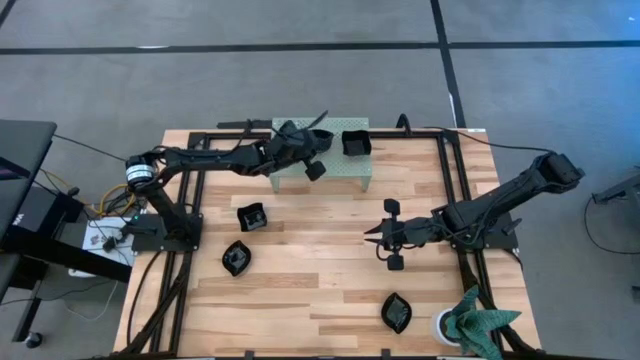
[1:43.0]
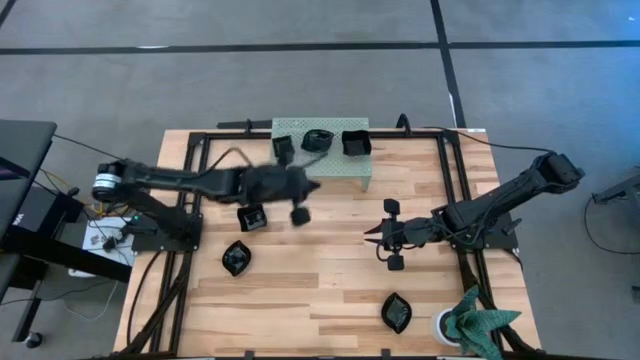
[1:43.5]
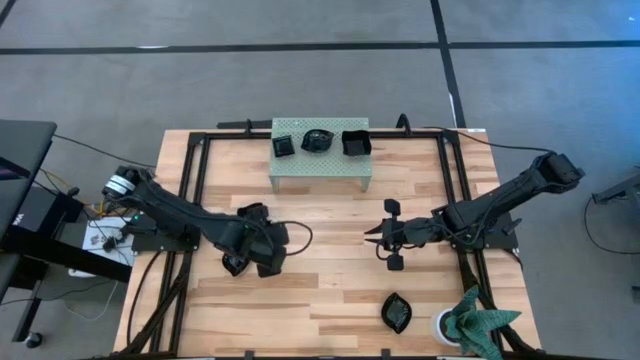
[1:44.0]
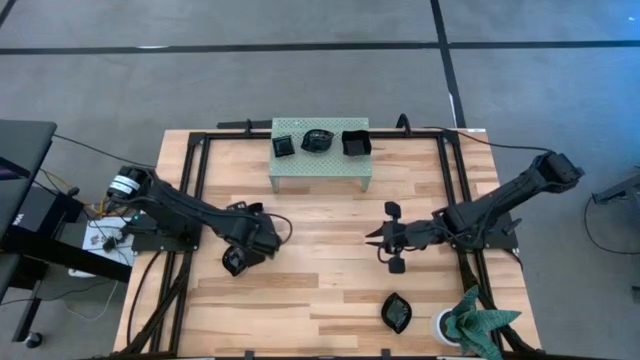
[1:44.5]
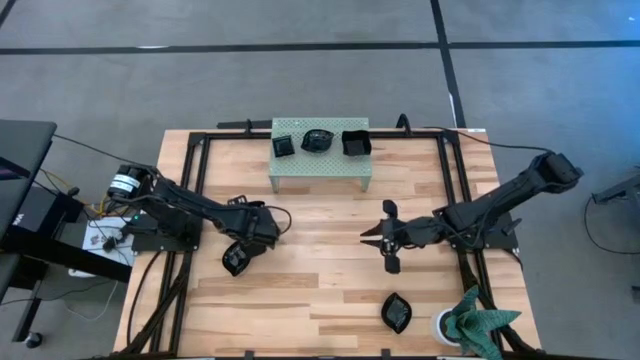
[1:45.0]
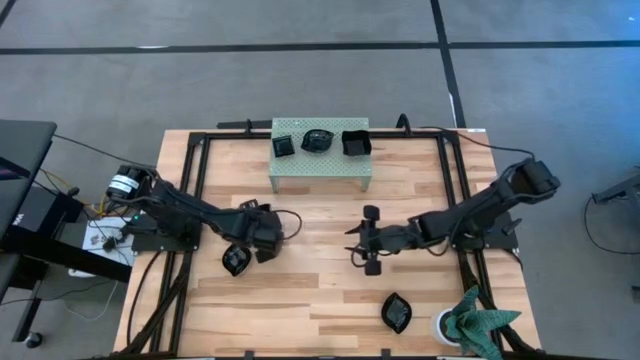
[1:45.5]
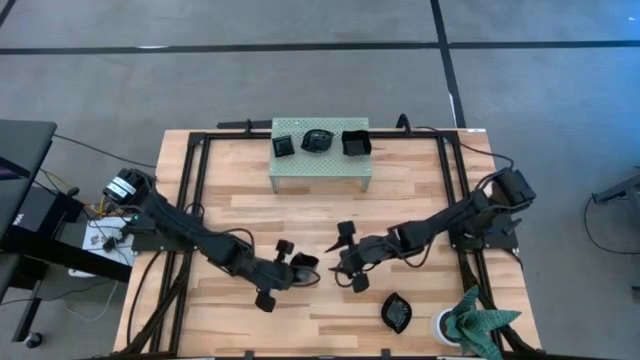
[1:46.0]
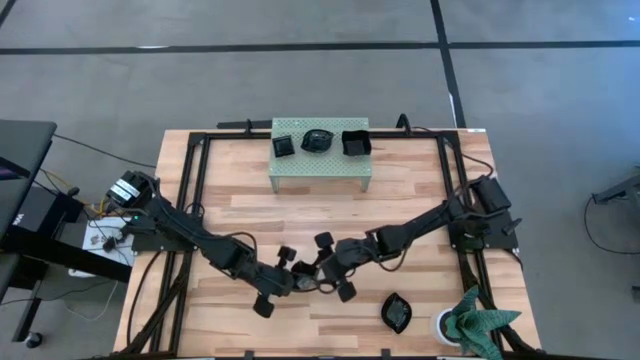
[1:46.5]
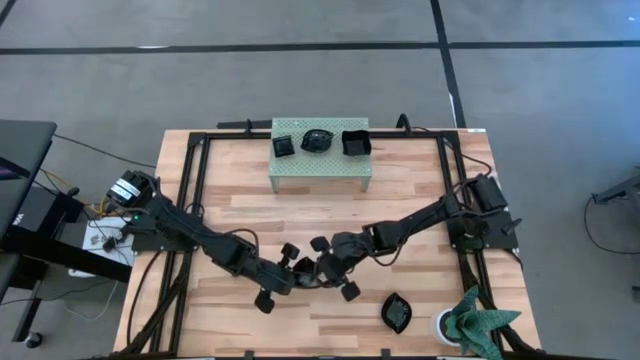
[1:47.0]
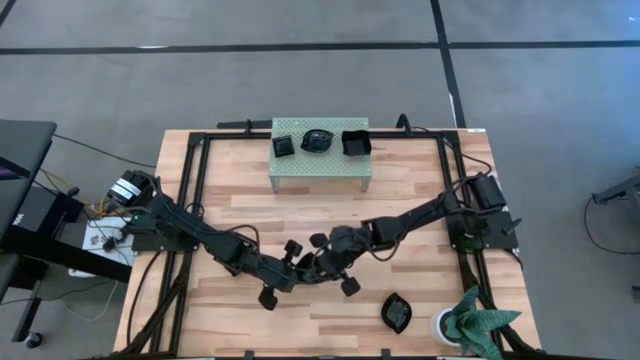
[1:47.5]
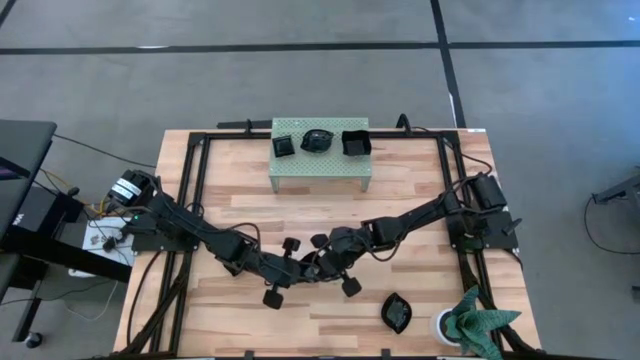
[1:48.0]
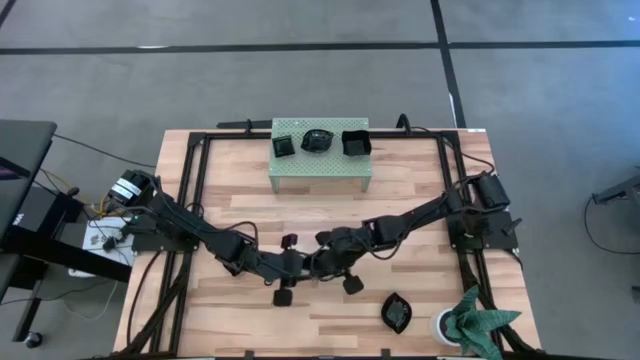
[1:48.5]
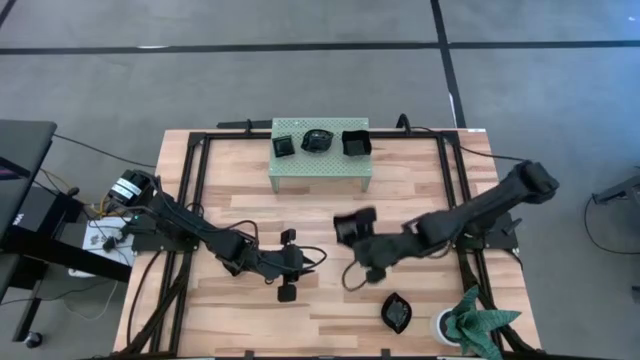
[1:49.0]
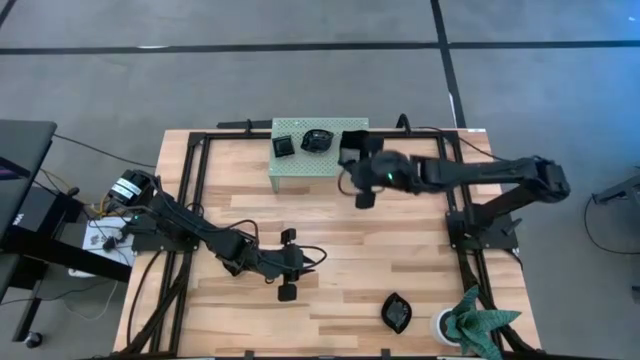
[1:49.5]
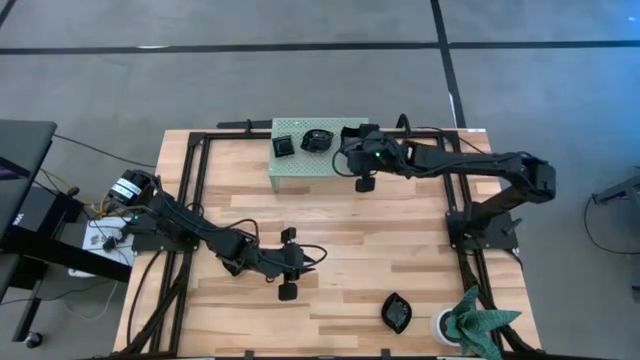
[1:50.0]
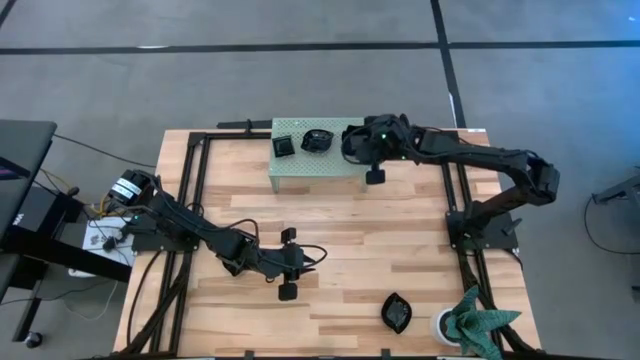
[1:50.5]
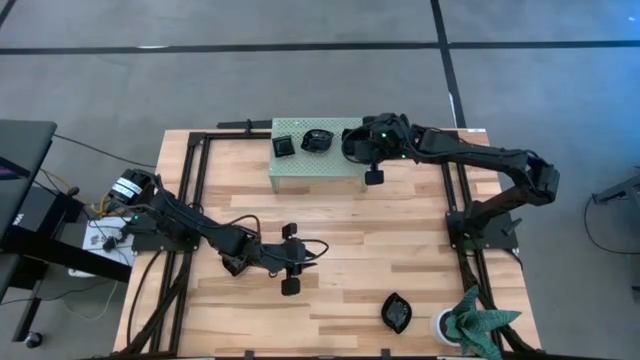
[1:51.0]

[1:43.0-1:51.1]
Task: Pick & Place Mini shaped plates
Stack the black distorted square plate on top of the black distorted square plate on the shelf

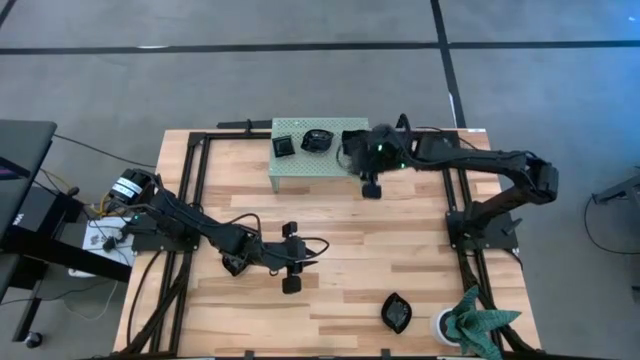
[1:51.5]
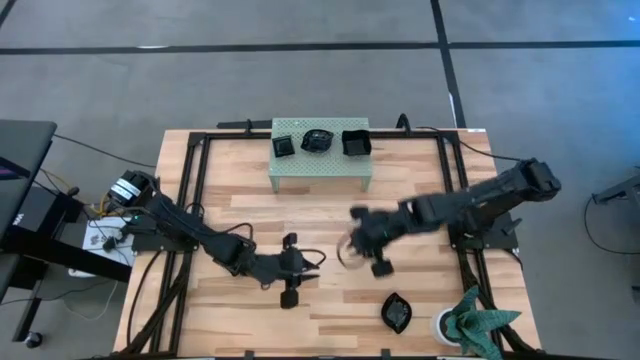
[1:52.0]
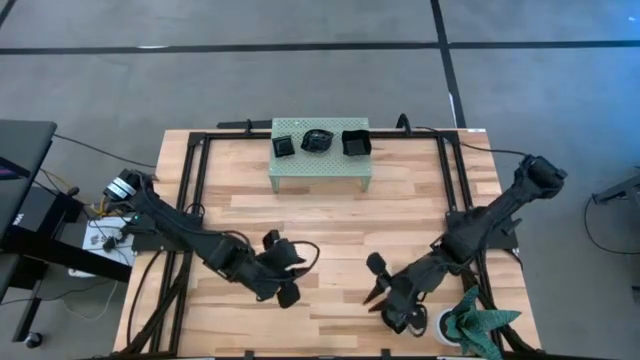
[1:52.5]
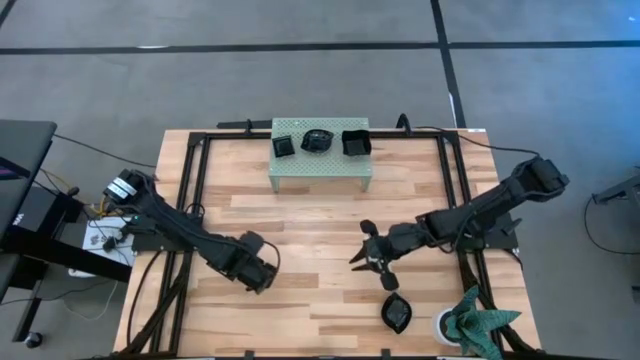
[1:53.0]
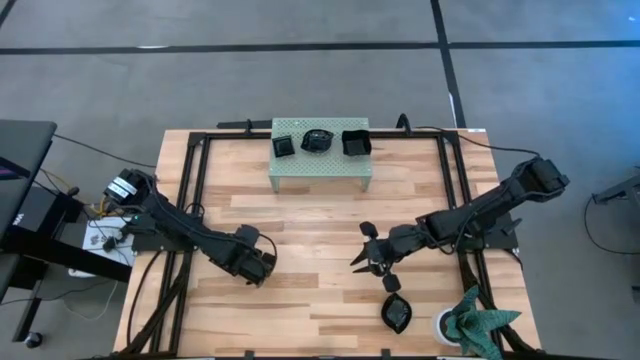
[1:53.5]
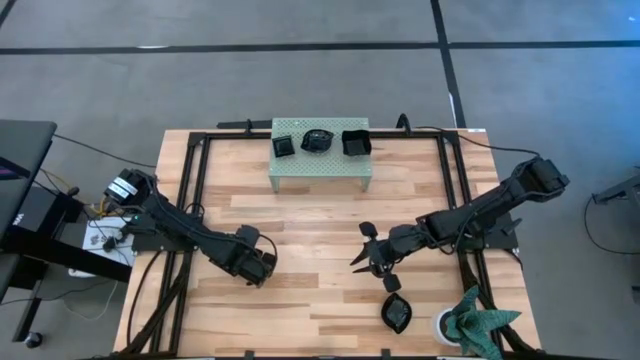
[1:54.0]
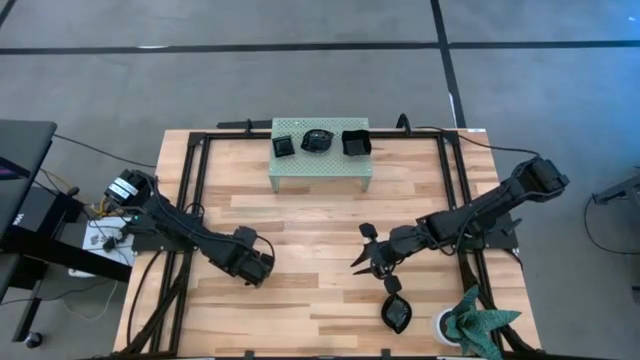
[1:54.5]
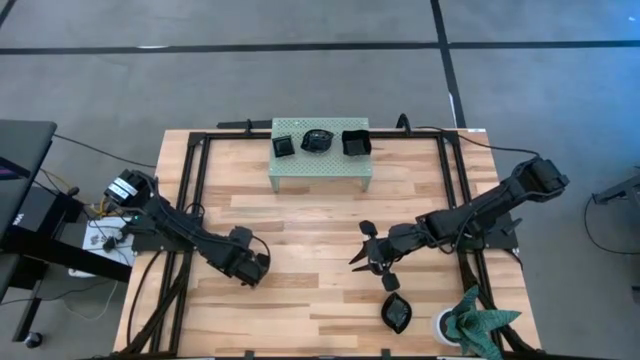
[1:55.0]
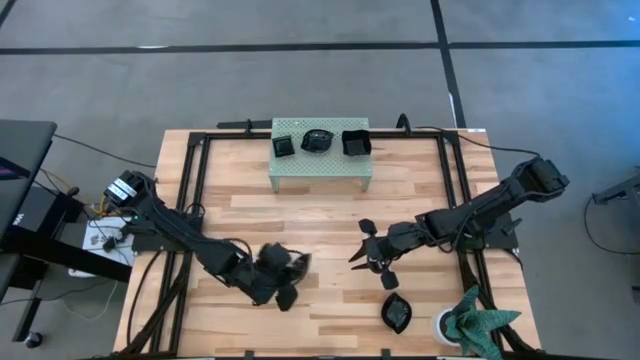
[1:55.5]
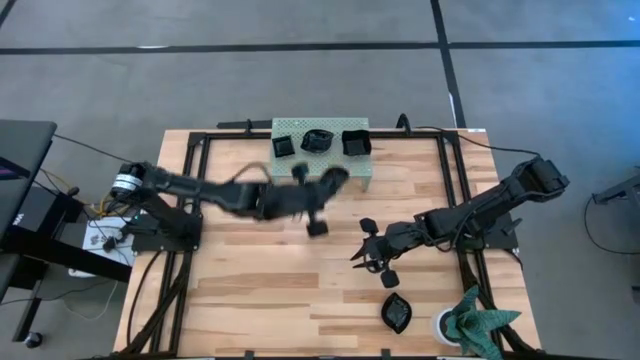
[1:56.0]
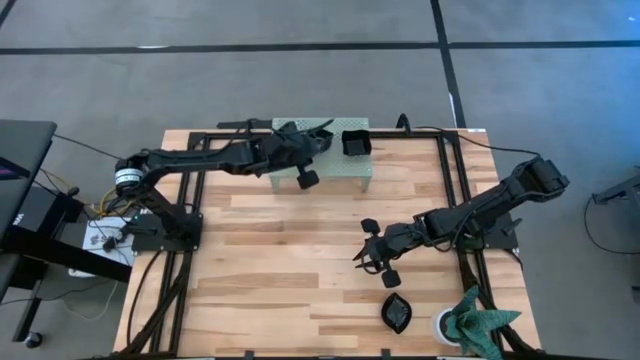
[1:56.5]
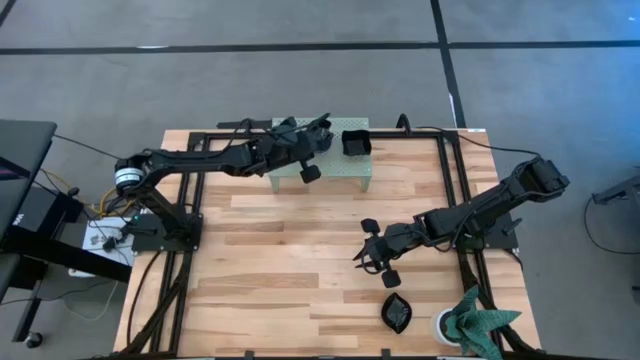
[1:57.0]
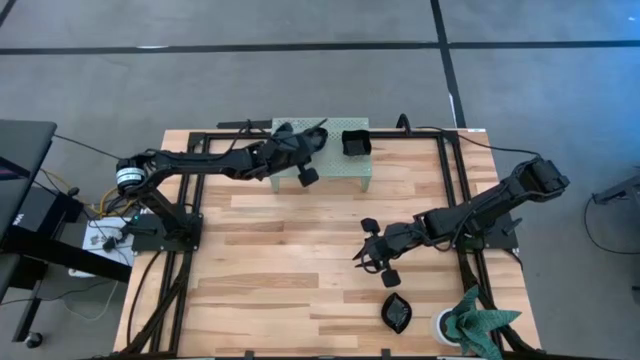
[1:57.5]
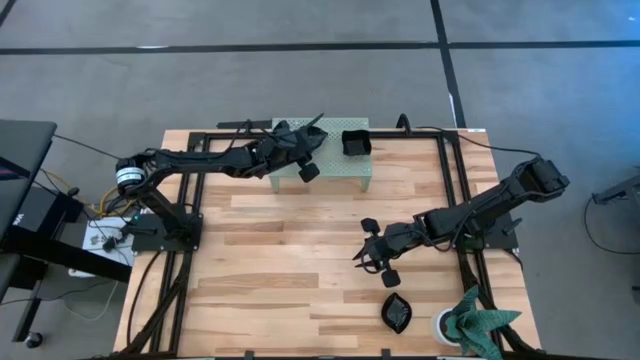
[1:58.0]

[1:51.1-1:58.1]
Stack the black leaf shape plate on top of the black leaf shape plate on the shelf

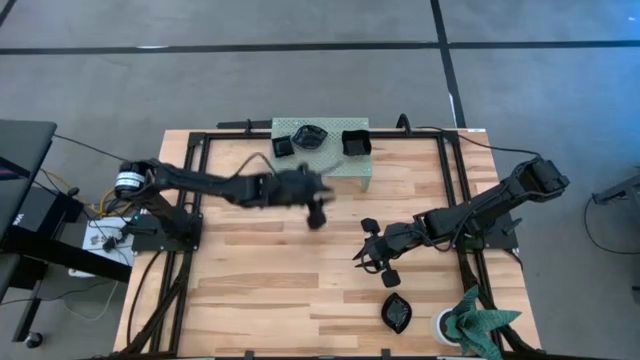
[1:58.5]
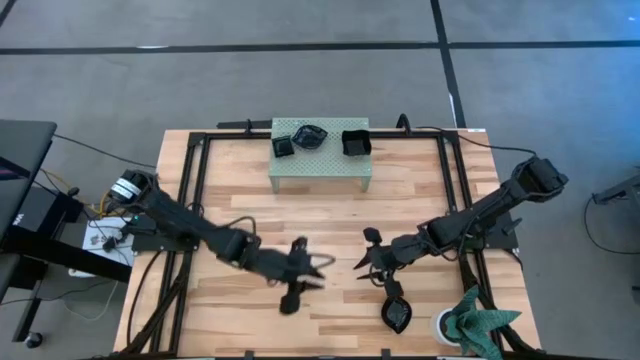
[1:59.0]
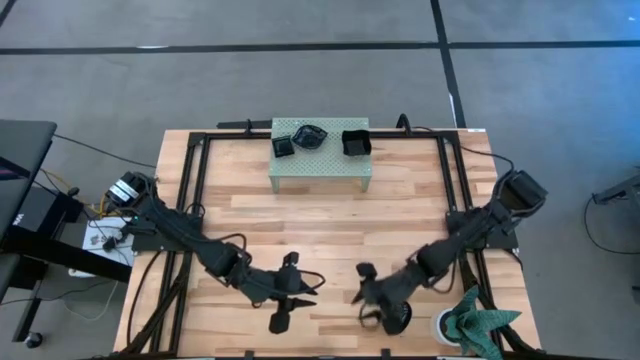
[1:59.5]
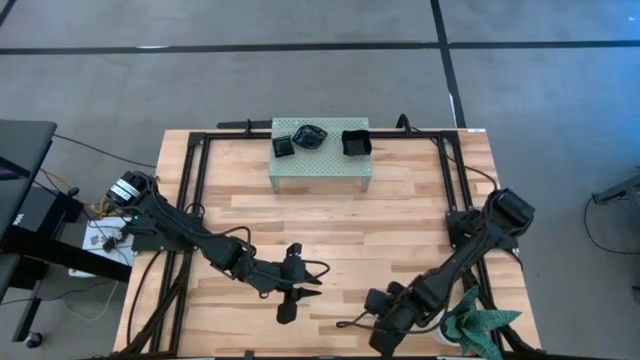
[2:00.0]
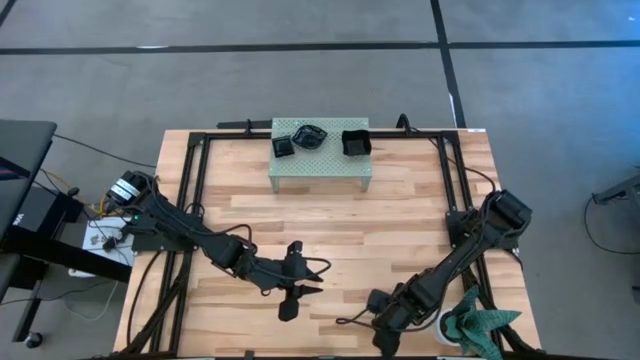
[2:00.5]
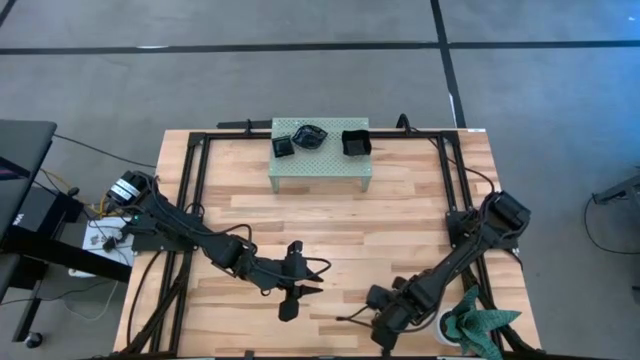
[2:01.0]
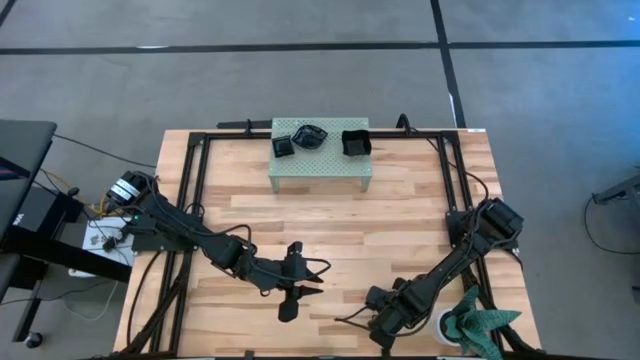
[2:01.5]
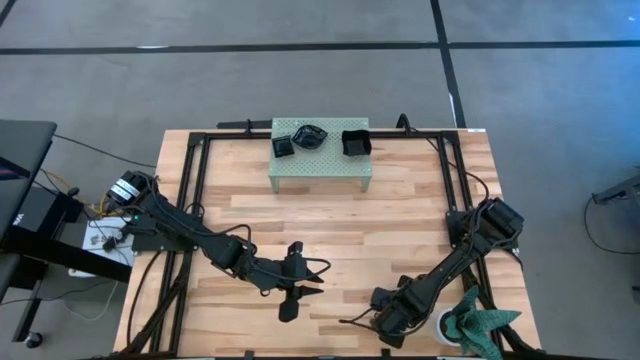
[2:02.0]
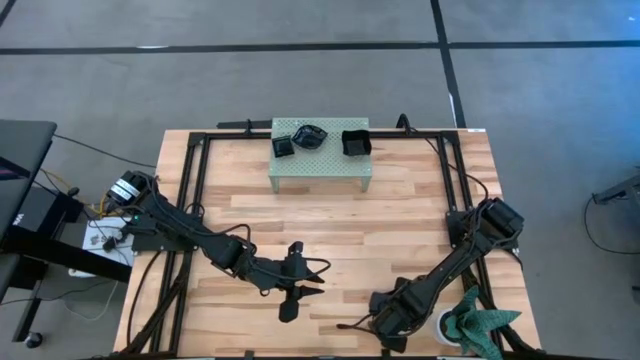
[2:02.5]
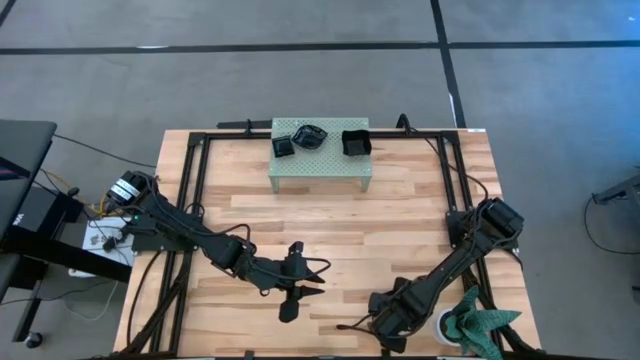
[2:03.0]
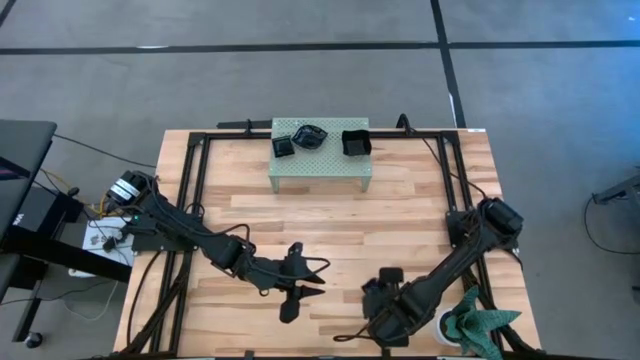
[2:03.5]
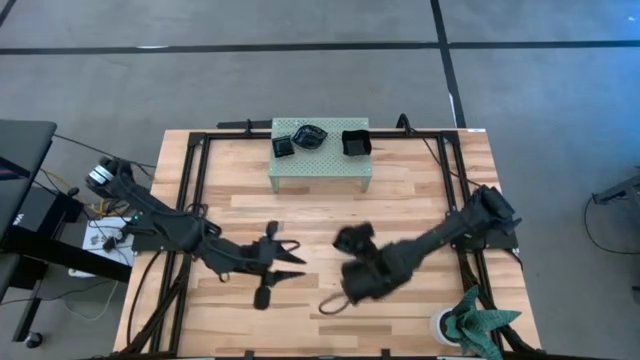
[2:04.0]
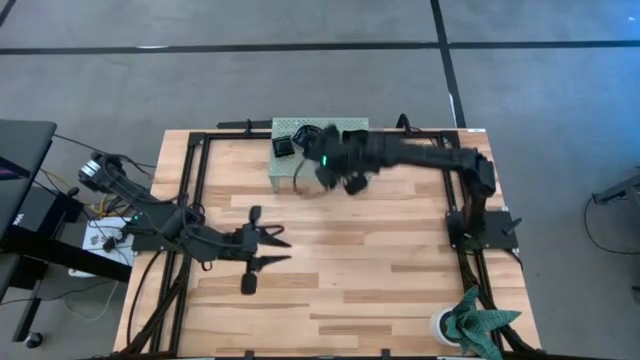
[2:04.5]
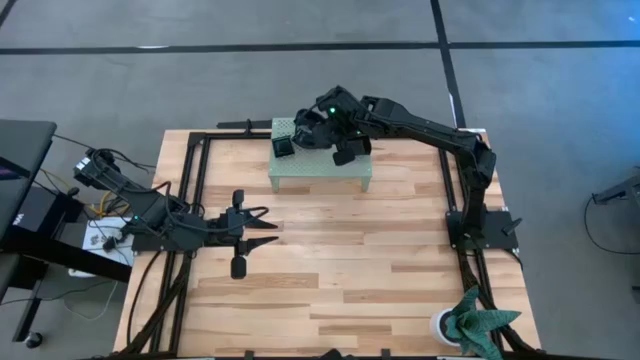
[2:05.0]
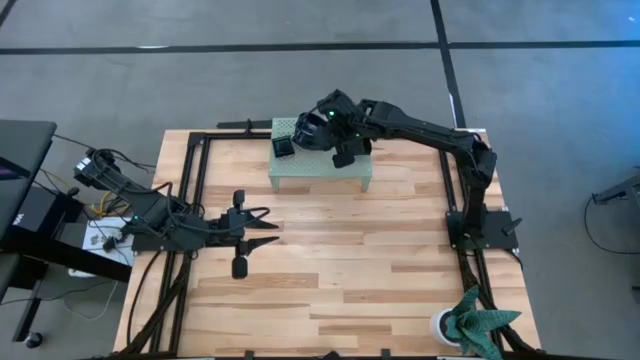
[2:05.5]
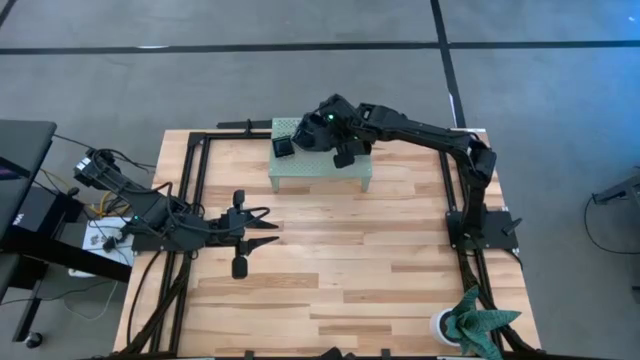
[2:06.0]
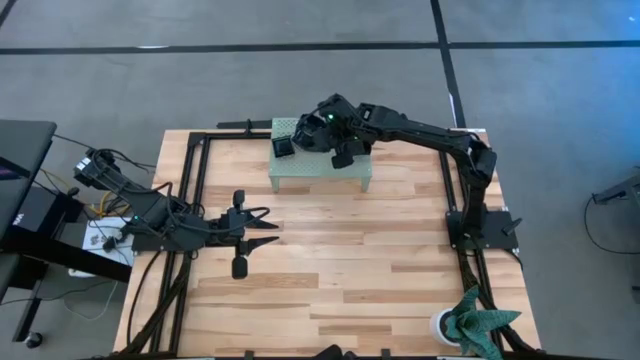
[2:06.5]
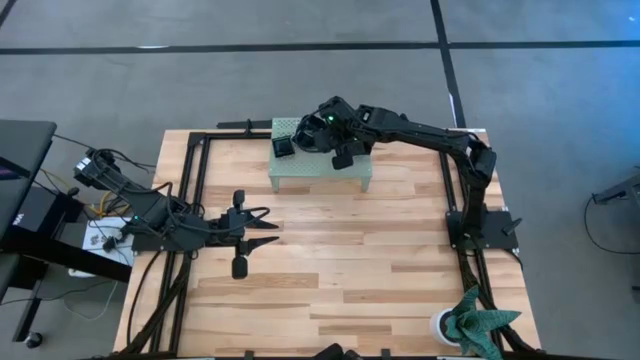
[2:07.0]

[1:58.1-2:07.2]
Stack the black leaf shape plate on top of the black leaf shape plate on the shelf
